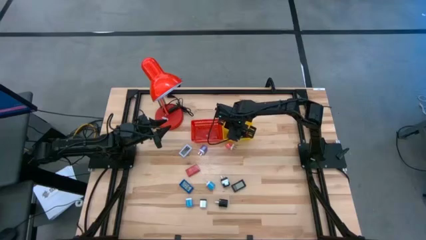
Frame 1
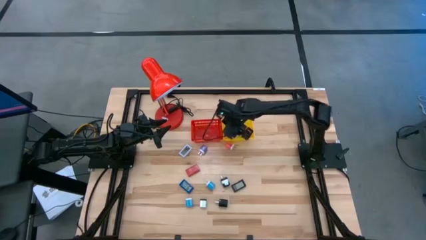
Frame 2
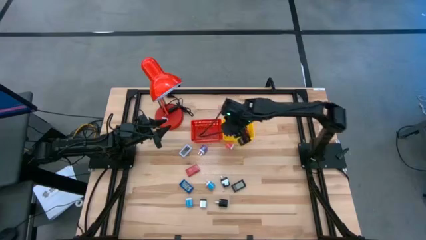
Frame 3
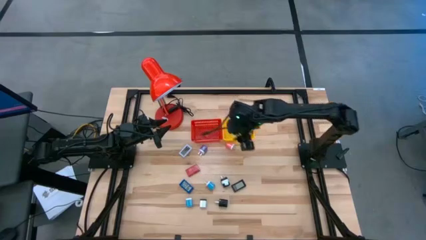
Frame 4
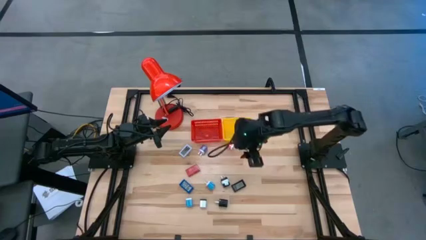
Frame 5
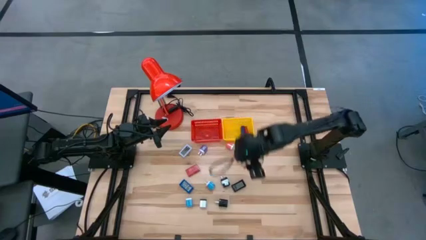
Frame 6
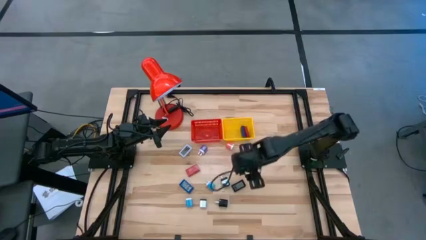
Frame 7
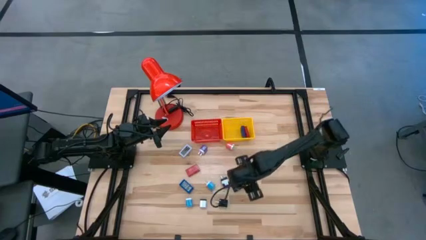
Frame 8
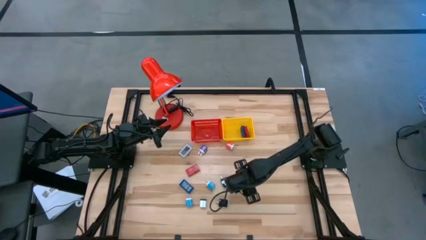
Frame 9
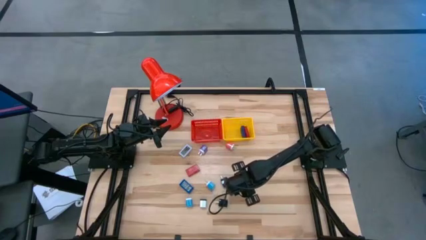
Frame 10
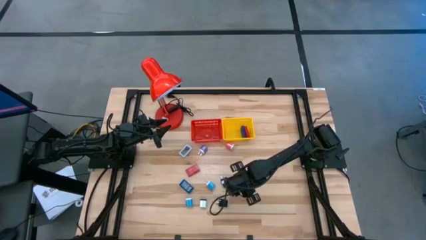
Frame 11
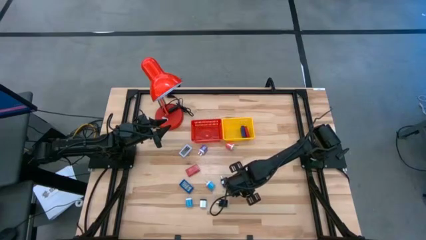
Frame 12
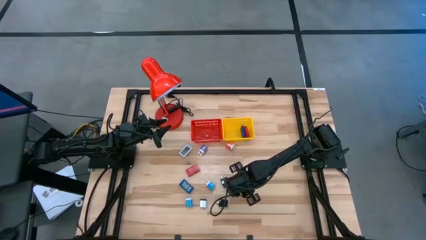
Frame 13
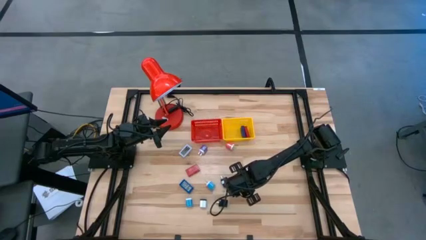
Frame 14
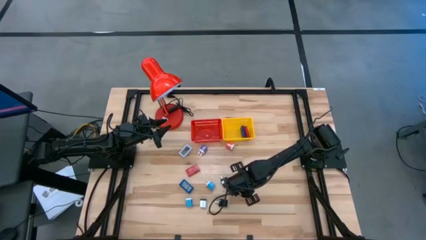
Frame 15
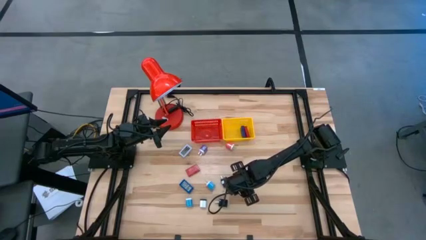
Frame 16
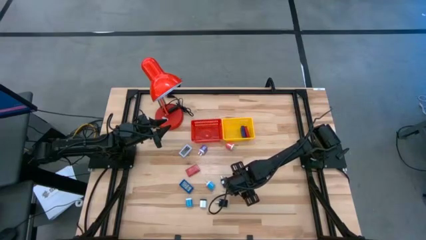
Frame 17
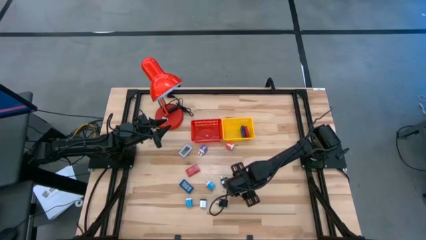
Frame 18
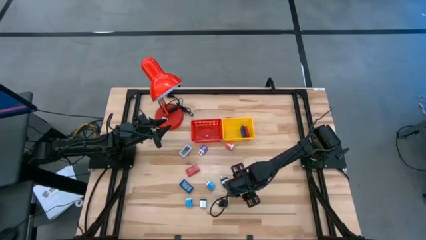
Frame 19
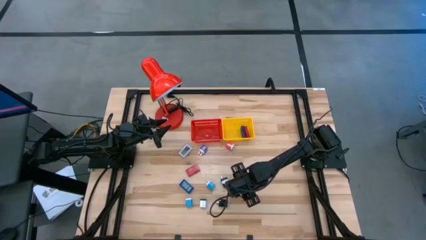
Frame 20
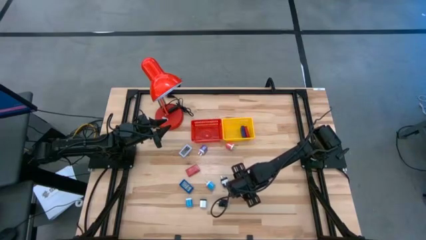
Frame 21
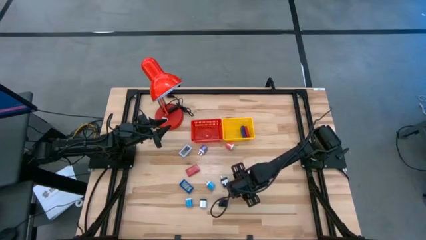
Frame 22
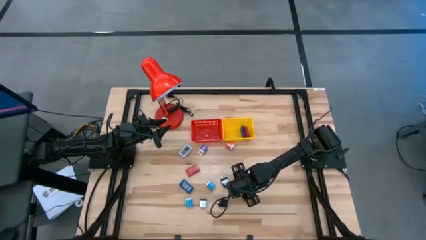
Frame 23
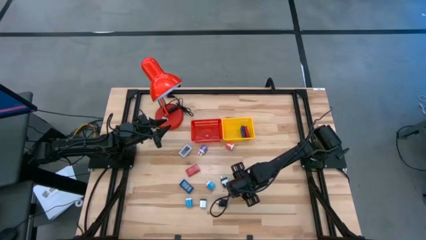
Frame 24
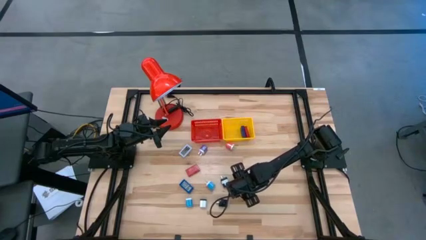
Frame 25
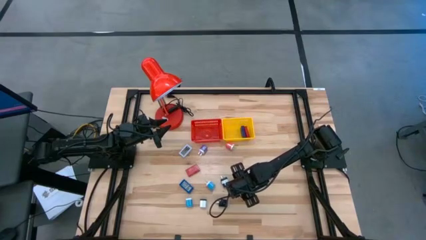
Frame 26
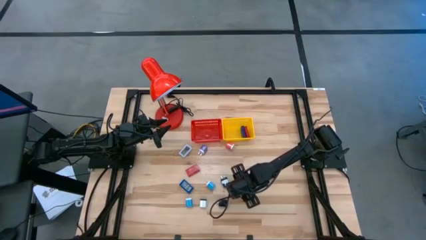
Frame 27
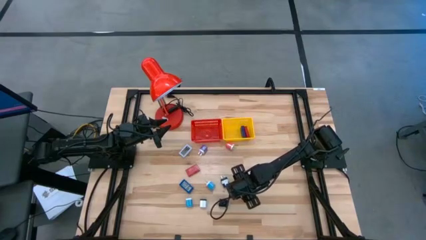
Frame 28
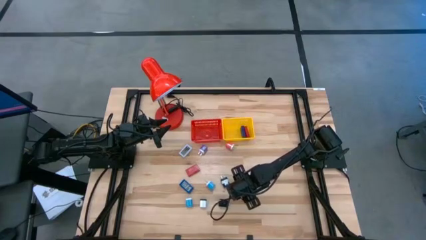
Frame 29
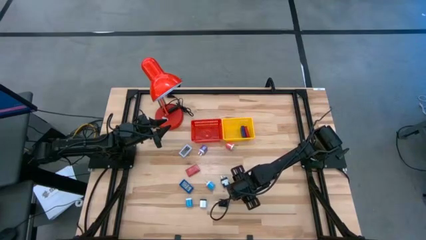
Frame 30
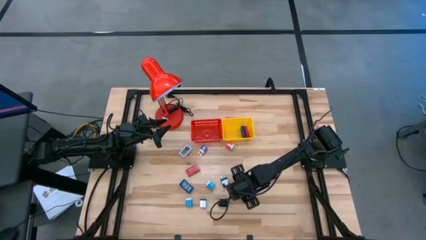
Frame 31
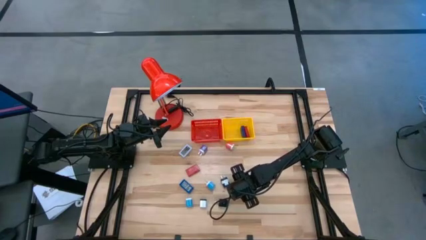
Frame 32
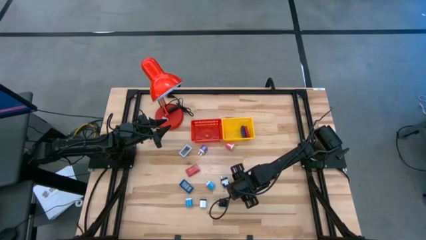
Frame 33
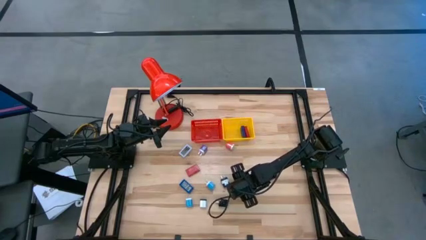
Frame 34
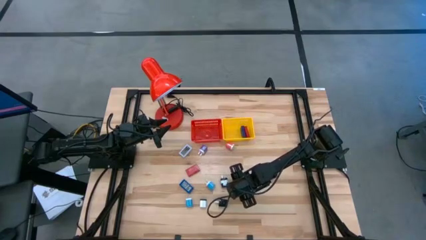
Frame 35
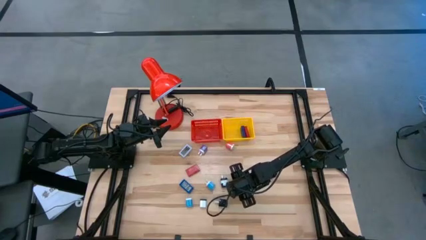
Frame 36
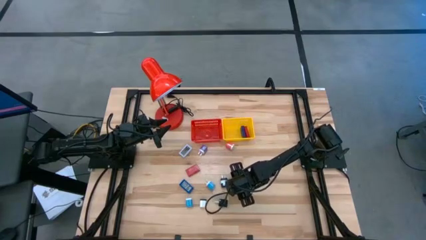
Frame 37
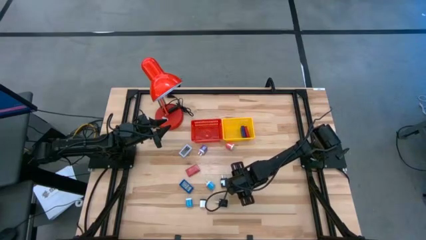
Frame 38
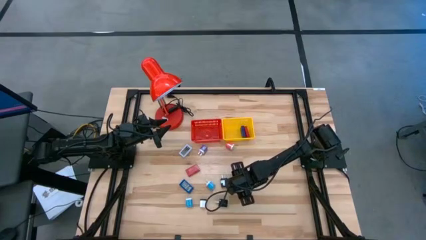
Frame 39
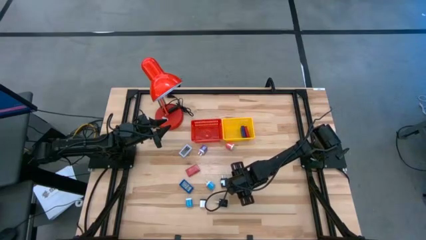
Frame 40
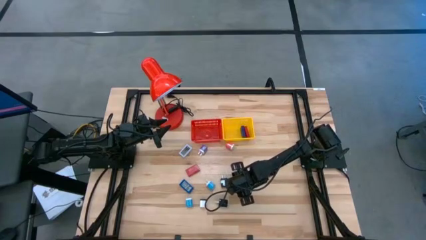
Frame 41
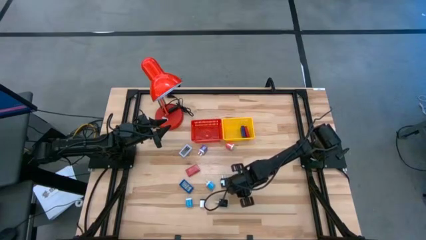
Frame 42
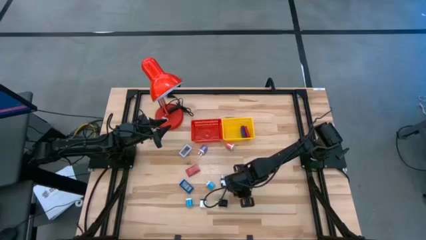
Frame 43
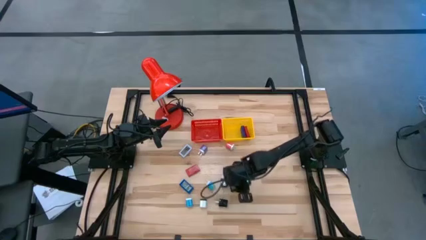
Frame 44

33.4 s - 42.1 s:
Task: Pick & Place Office items
Put the black digital timer into the yellow bin
